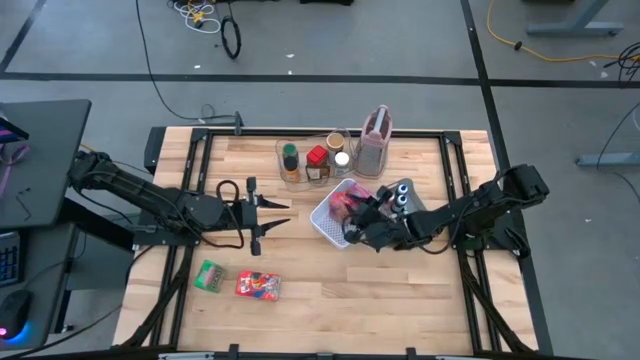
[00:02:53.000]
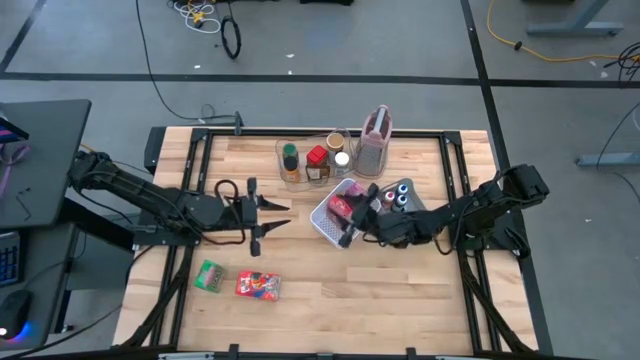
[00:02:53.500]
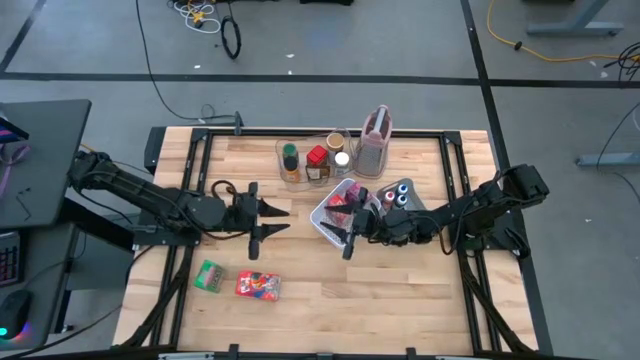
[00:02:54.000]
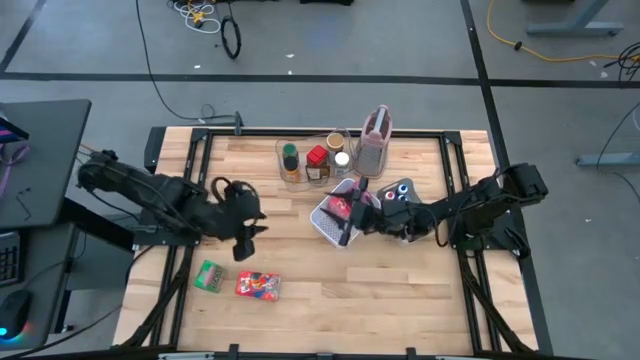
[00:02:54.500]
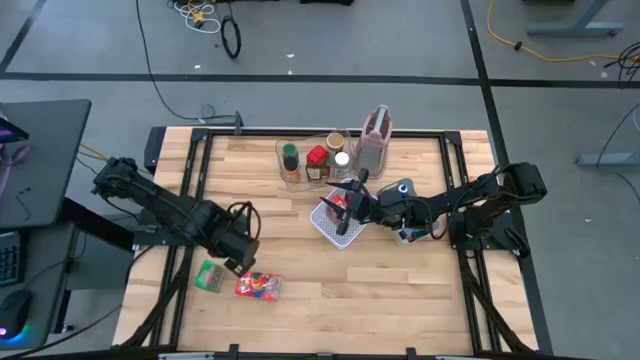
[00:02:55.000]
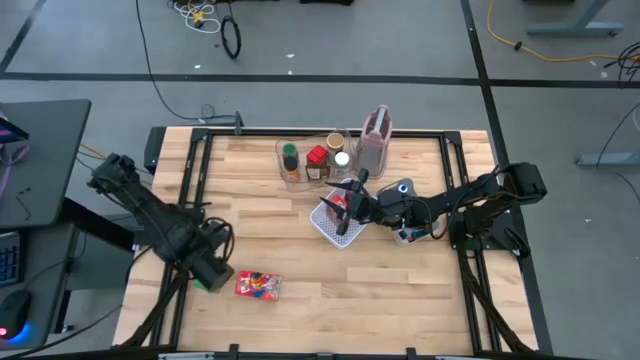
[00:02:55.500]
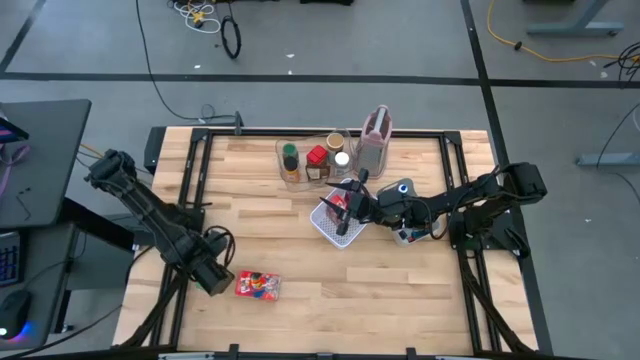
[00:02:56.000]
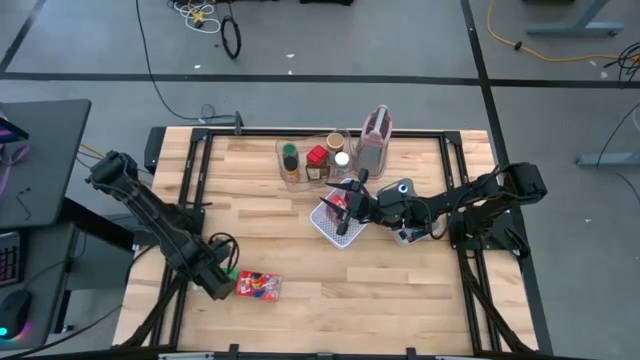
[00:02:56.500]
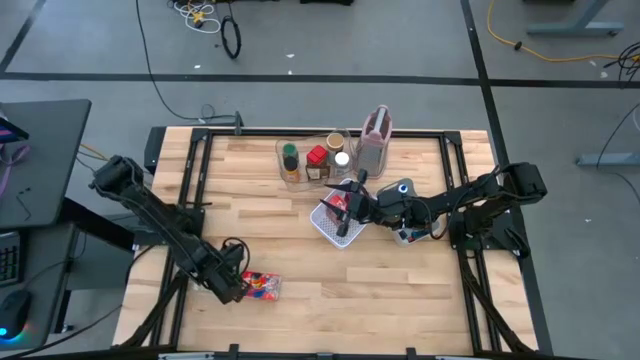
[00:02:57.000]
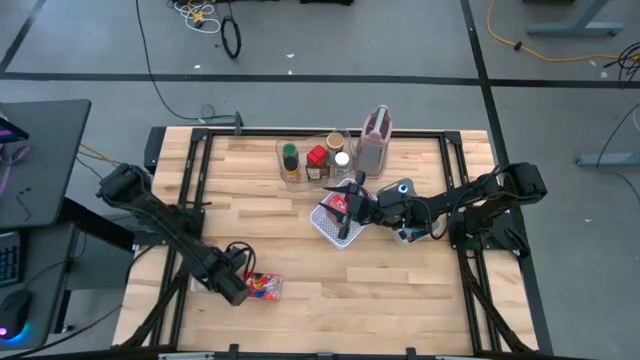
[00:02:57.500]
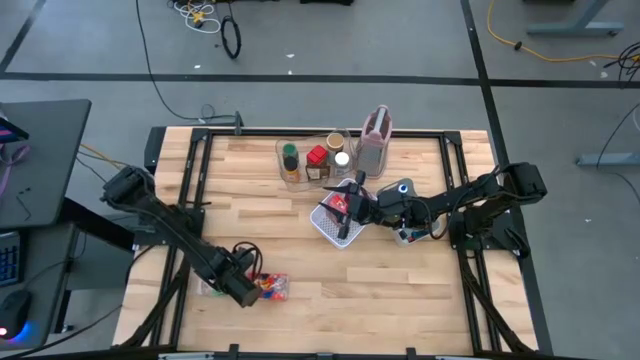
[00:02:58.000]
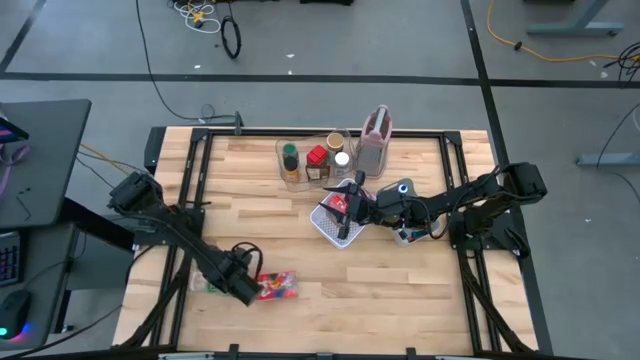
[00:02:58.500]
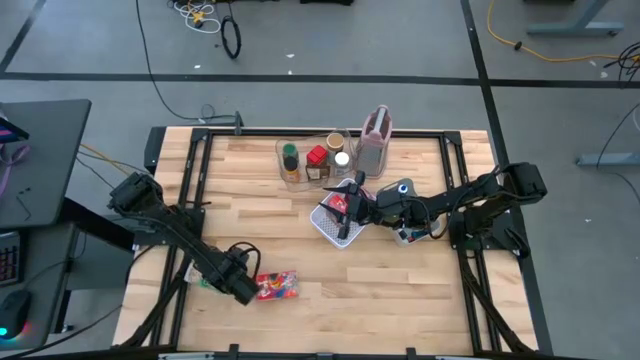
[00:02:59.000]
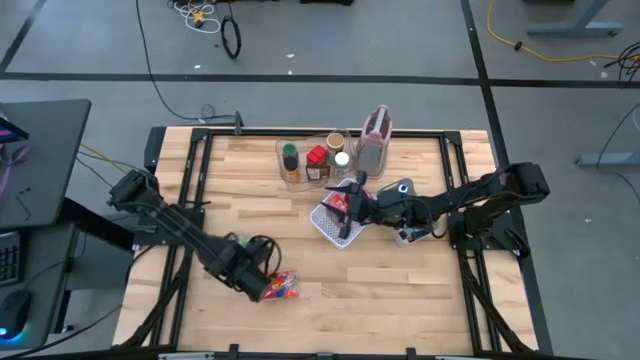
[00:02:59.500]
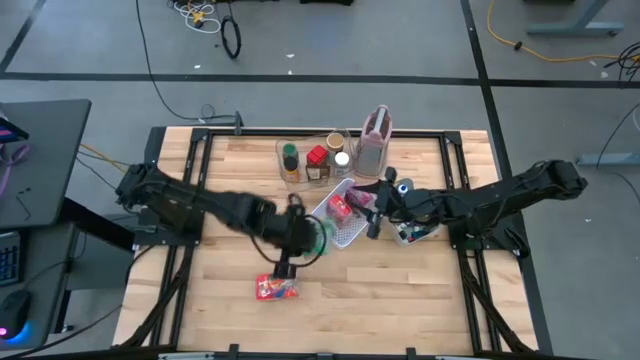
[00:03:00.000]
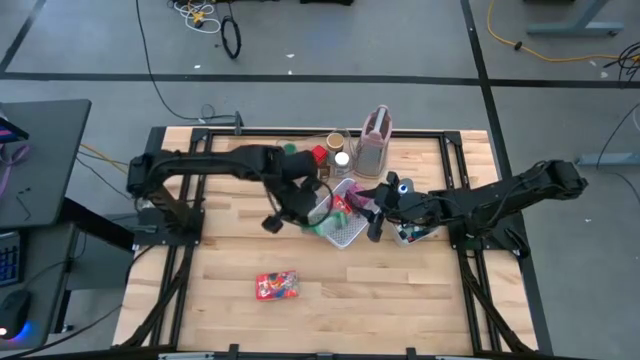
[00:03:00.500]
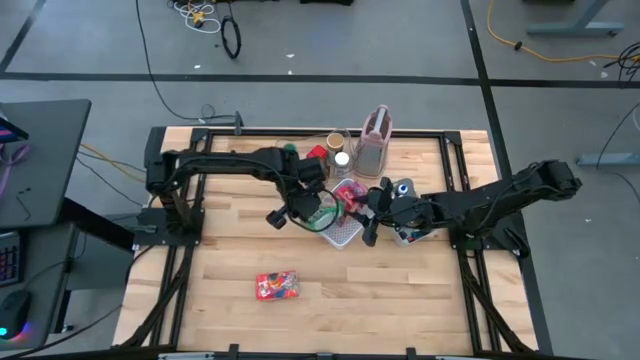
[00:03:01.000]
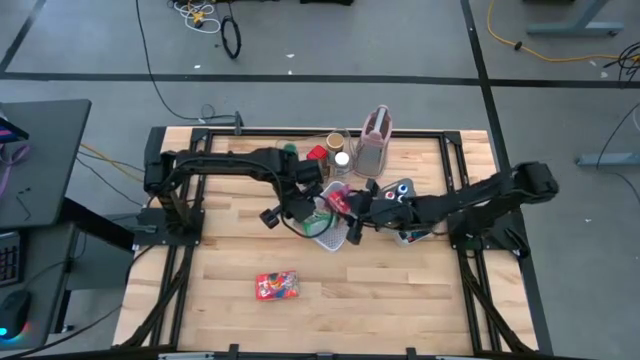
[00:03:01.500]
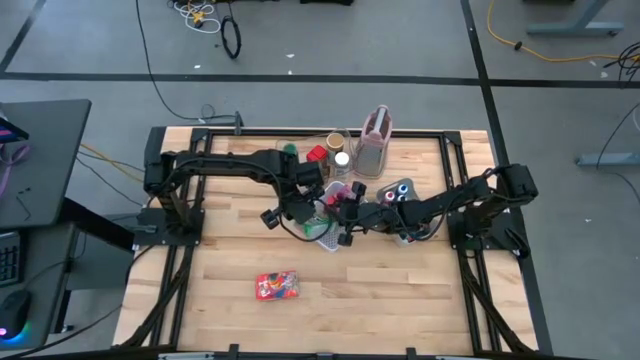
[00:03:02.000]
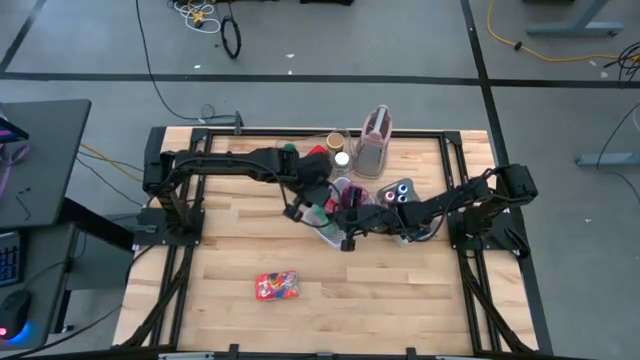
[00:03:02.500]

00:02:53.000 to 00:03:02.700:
Task: Pick & Place Kitchen Items
Put the green cereal box into the white bin

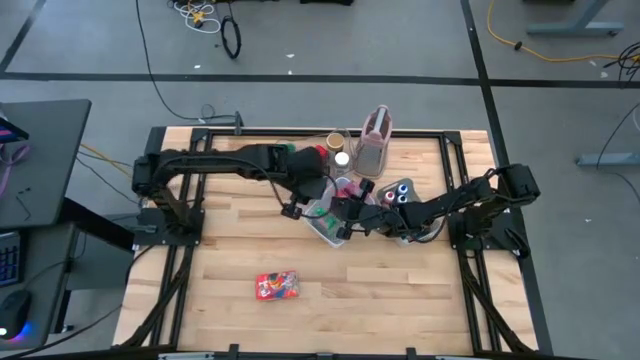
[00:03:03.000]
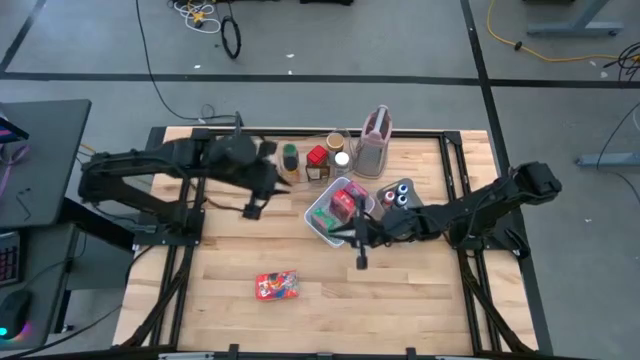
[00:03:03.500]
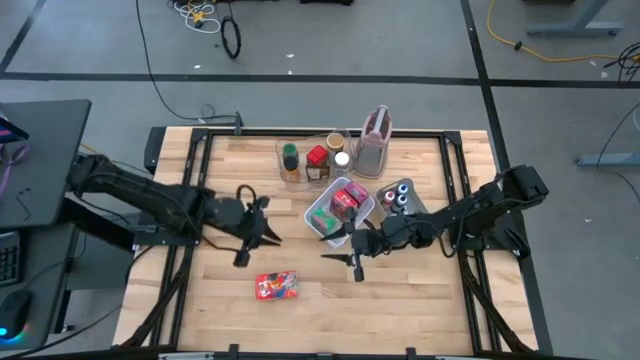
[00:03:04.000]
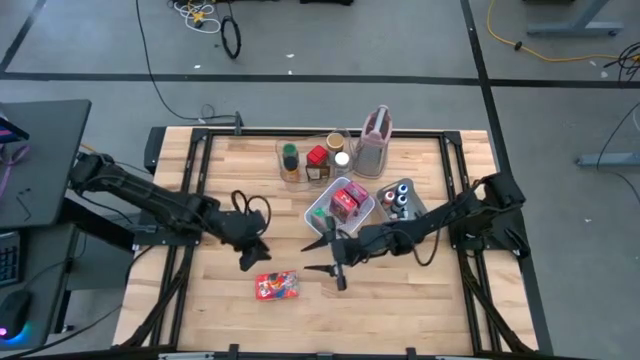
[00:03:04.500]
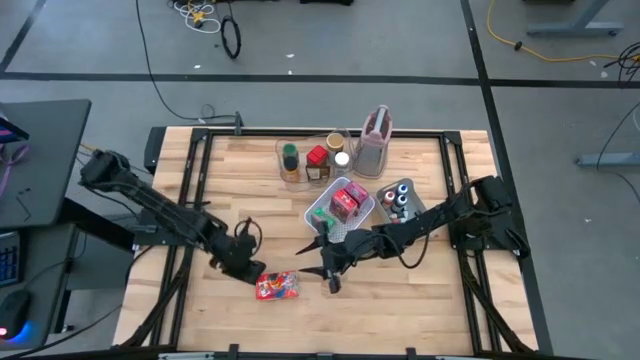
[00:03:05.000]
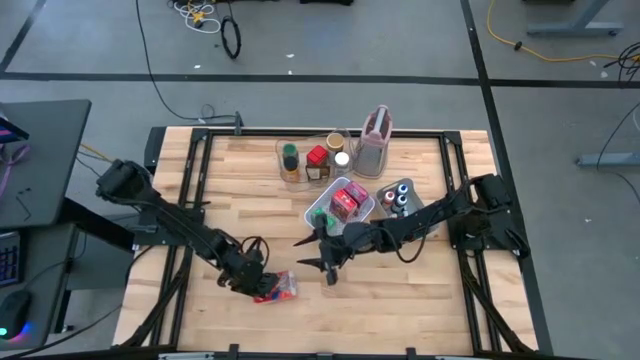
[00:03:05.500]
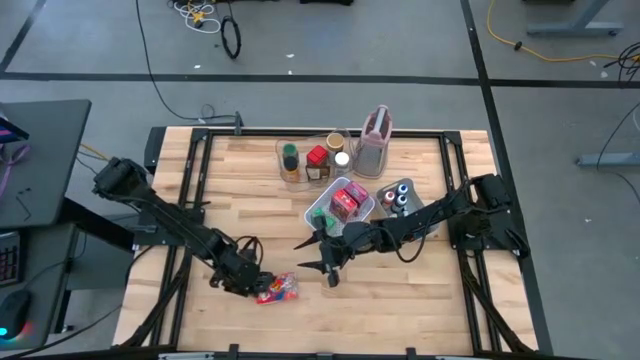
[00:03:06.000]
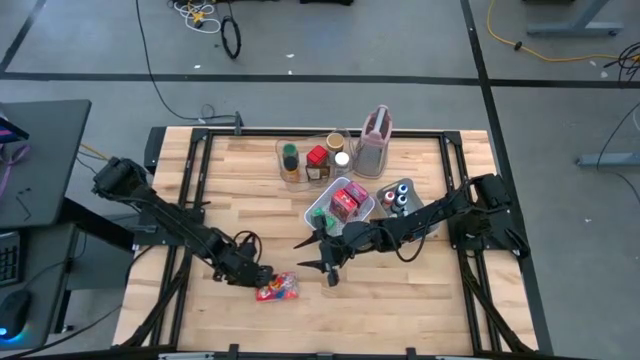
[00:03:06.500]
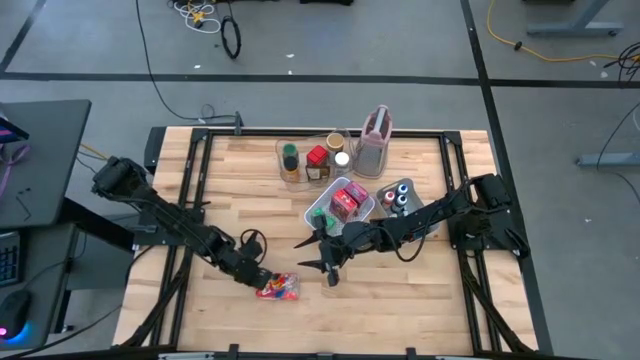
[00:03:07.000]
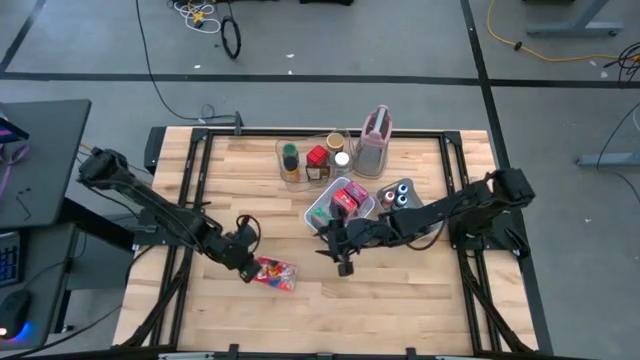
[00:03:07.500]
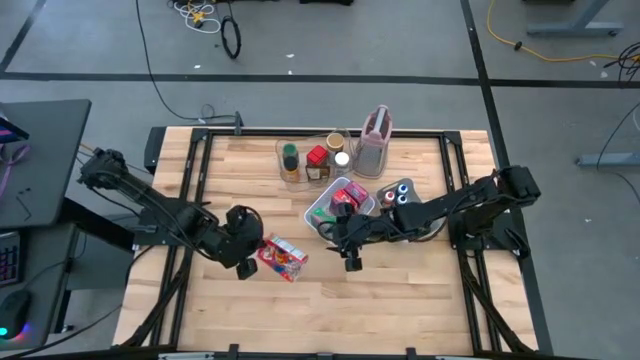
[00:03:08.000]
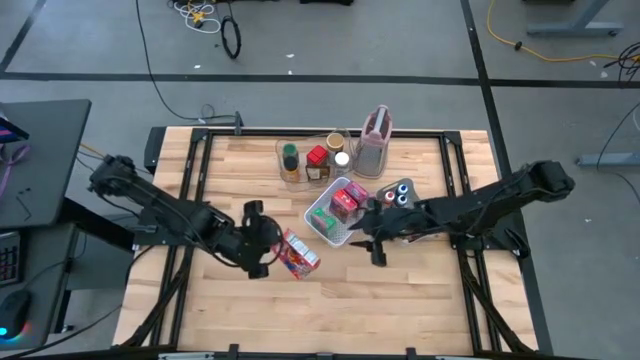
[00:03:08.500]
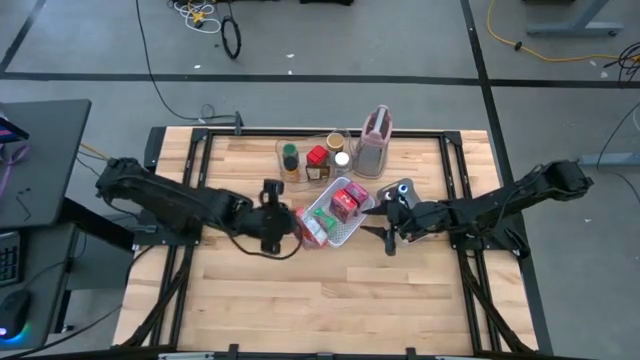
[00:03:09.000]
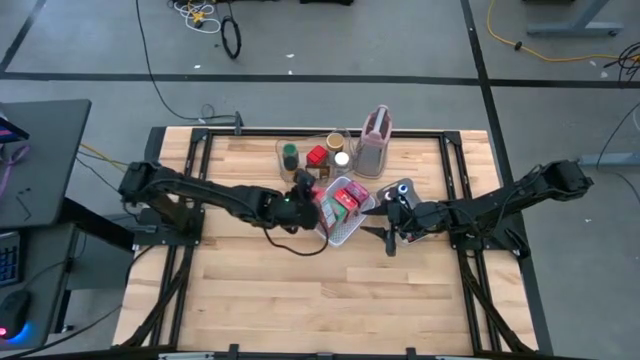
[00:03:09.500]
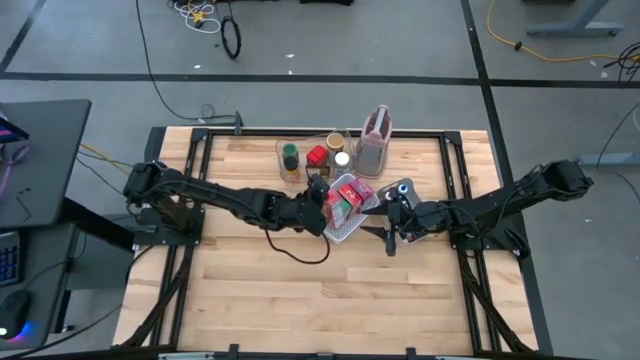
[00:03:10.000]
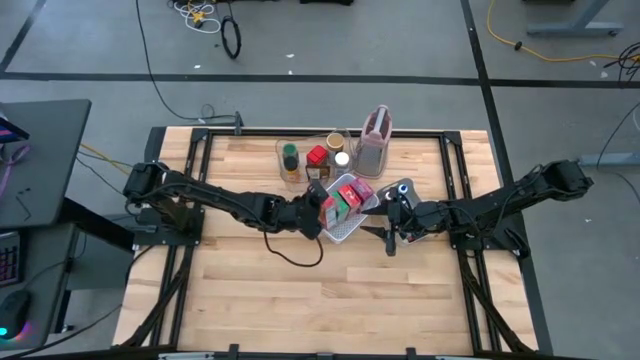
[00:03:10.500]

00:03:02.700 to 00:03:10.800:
Put the red cereal box into the white bin
